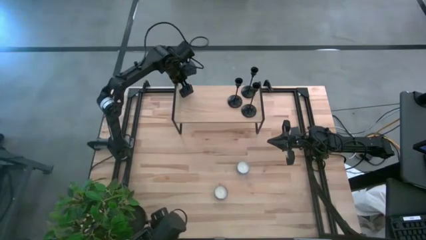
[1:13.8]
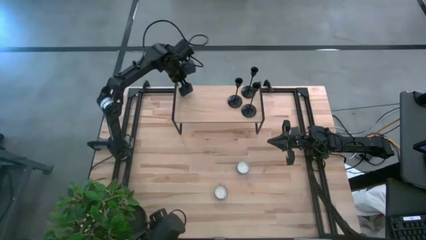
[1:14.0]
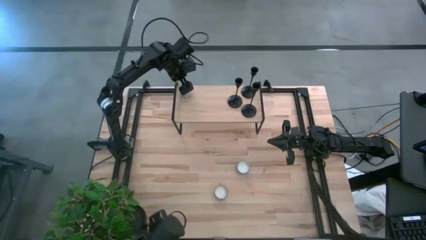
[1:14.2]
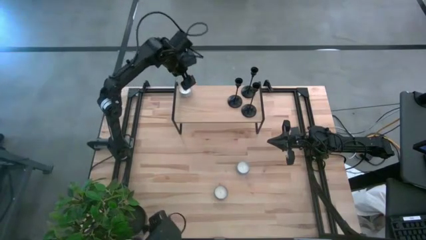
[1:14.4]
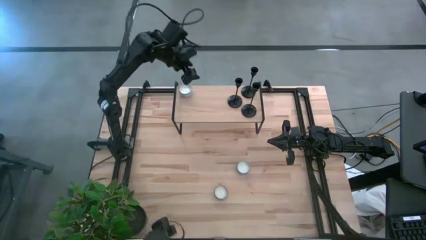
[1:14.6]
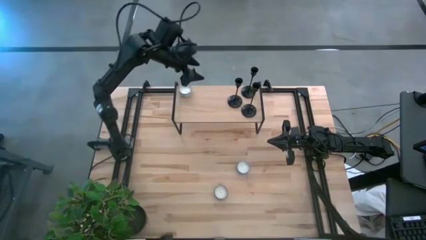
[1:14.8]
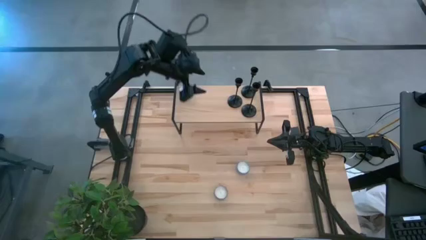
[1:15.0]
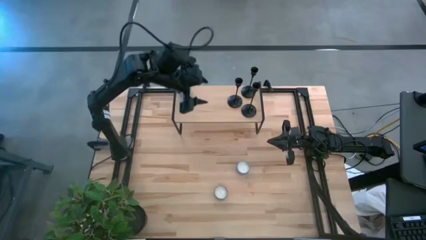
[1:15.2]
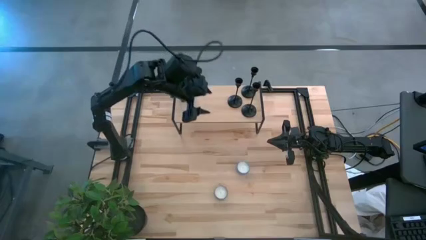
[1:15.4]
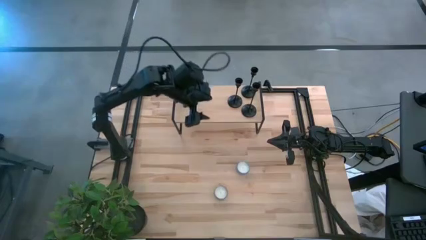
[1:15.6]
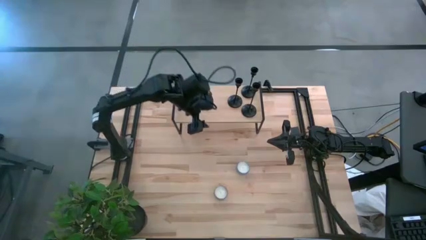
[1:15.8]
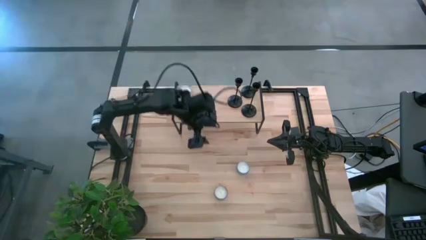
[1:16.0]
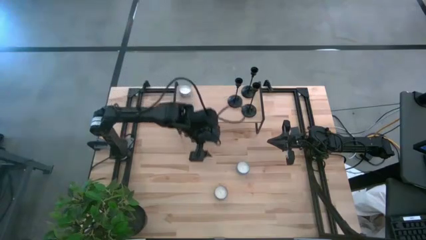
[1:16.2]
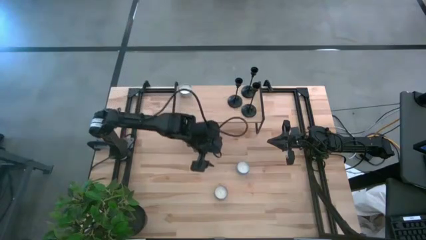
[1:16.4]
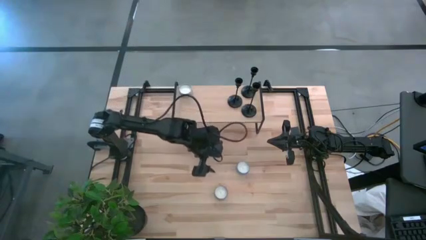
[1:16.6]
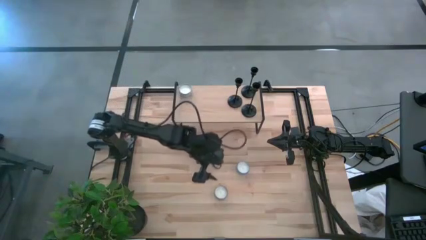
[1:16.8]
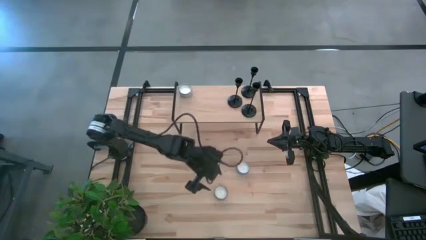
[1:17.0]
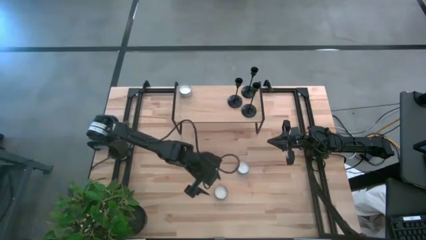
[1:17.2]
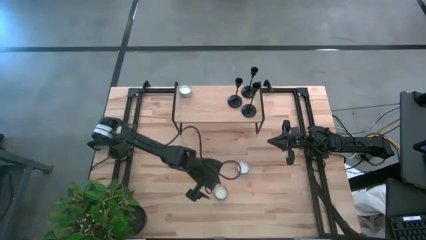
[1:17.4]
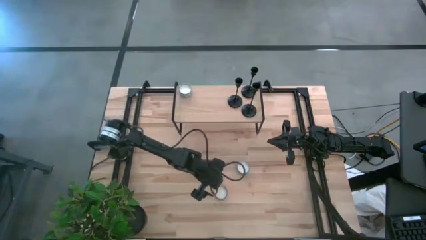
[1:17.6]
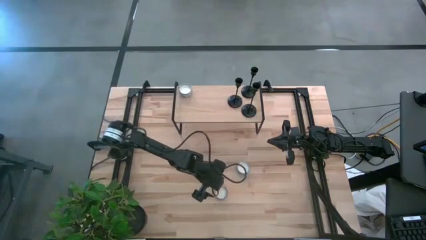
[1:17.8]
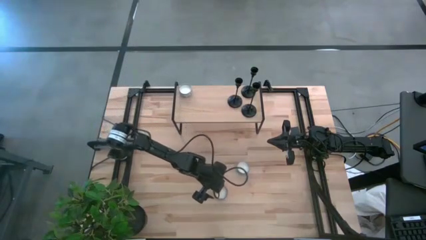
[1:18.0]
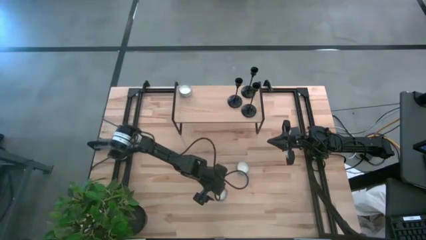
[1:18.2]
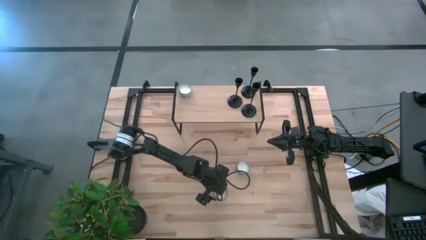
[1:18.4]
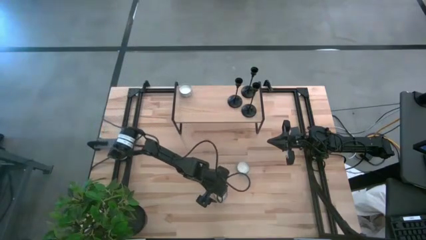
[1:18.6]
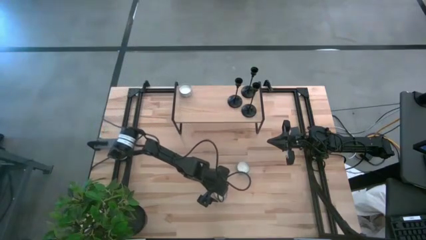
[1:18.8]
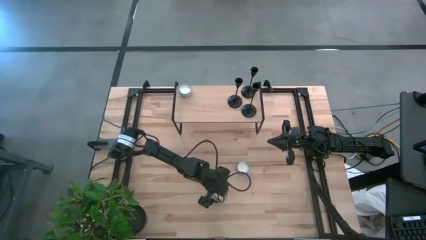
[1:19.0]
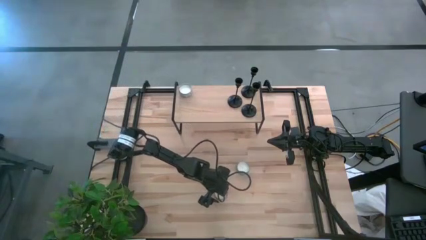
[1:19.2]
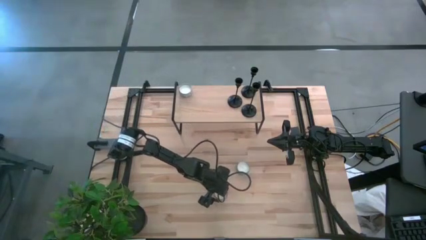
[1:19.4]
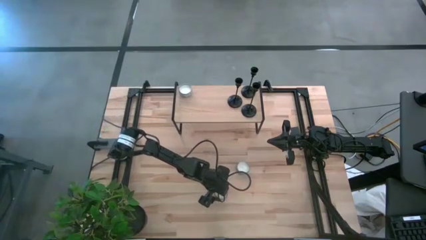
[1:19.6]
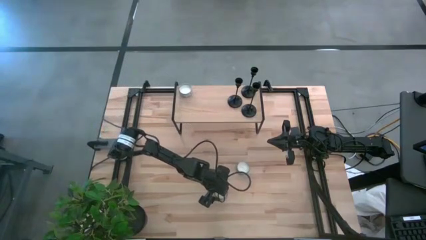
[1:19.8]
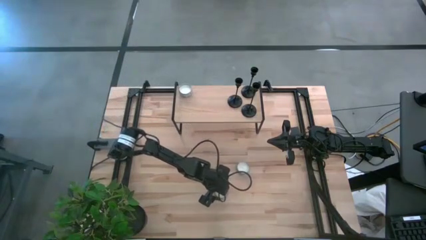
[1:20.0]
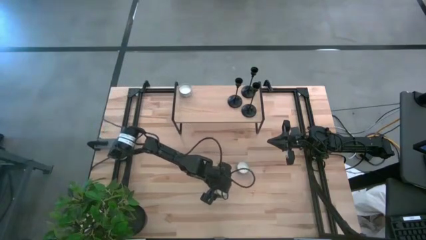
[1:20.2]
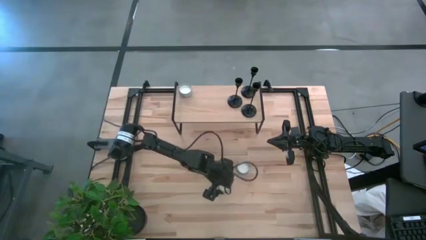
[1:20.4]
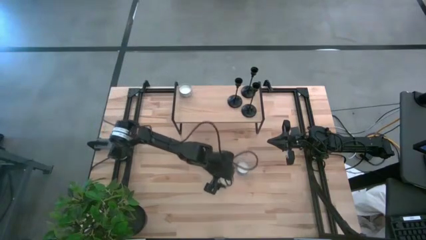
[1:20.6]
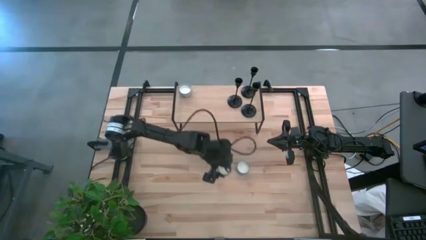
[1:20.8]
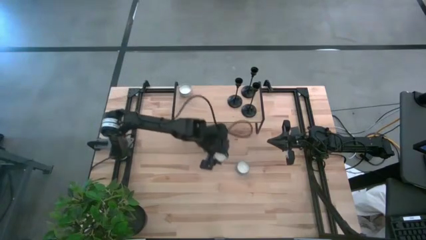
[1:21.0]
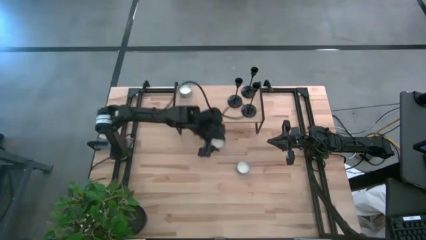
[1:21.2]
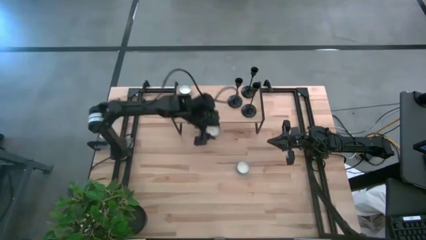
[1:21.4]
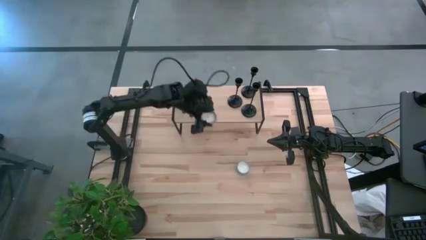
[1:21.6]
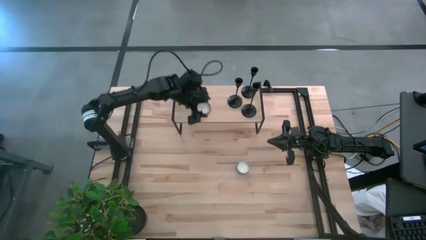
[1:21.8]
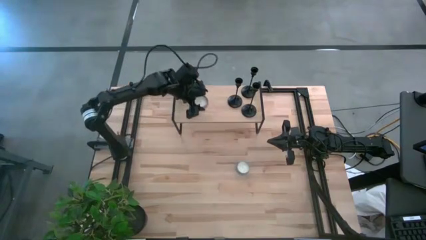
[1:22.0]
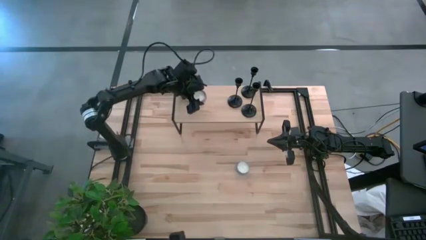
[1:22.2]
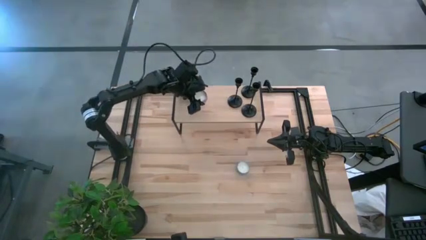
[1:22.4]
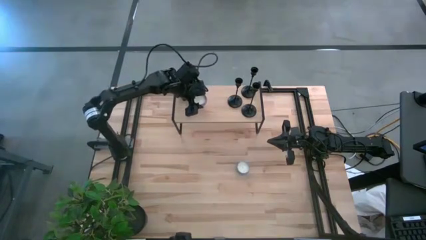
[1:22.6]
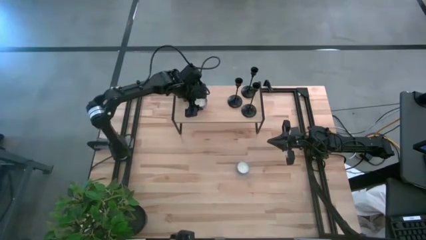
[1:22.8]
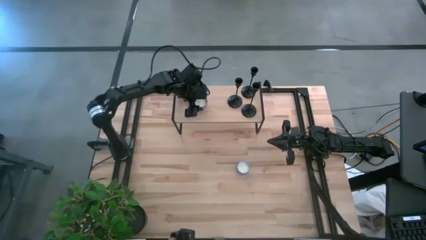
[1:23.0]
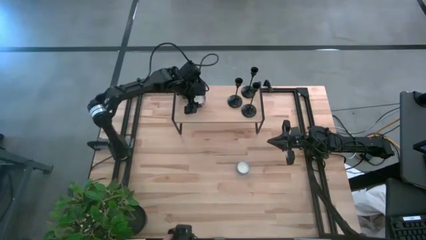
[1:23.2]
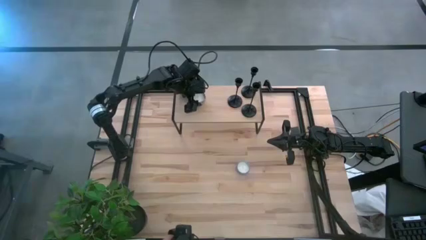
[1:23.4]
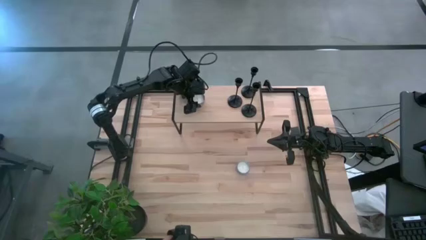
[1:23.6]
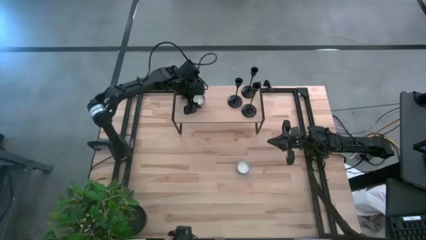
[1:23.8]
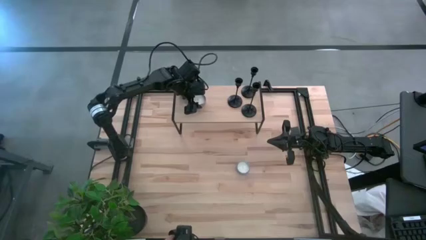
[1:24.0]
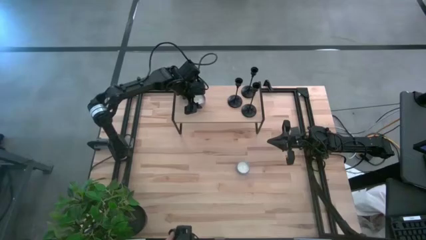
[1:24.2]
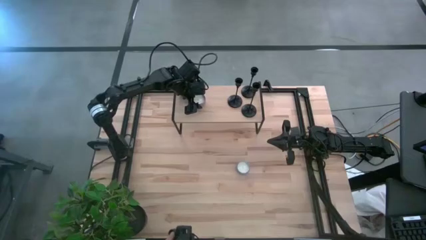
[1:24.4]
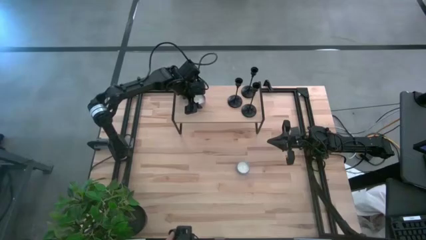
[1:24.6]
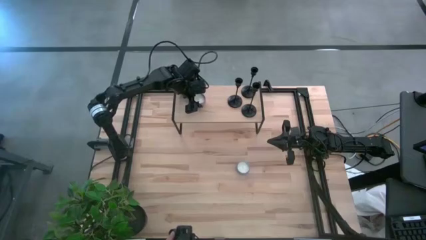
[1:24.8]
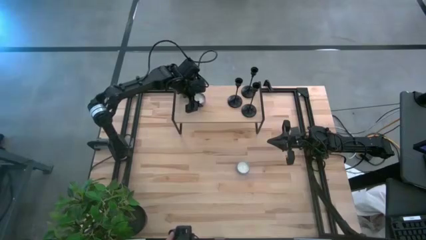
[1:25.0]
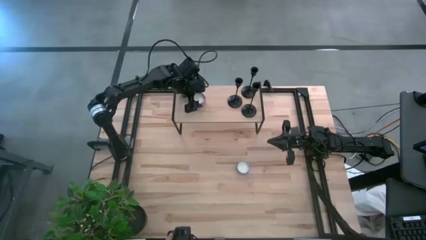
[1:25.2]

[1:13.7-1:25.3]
Task: Pick & Place candle stick holders
Put the pink scented candle on the shelf

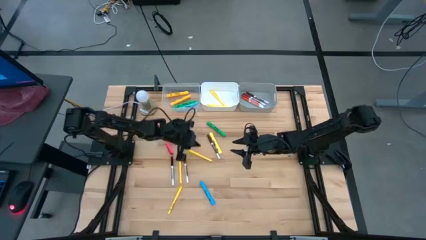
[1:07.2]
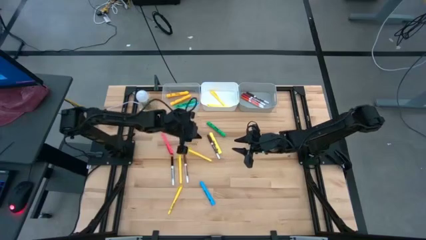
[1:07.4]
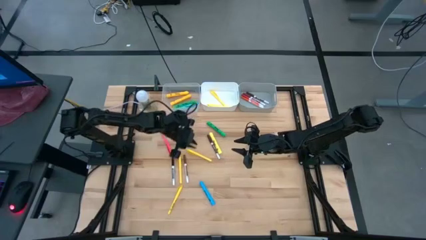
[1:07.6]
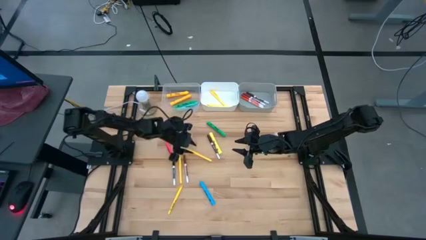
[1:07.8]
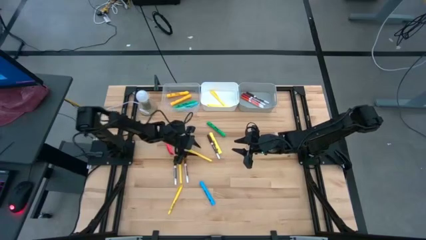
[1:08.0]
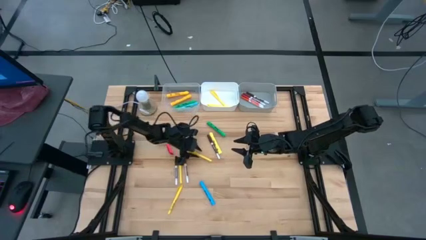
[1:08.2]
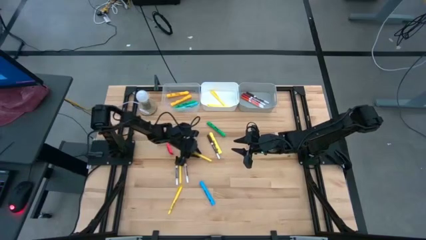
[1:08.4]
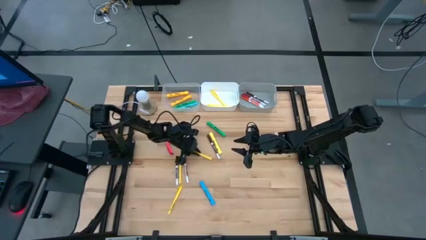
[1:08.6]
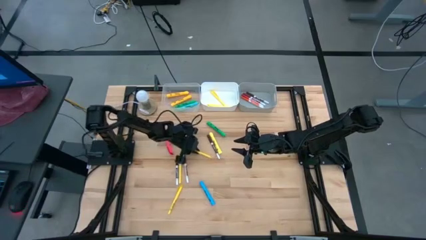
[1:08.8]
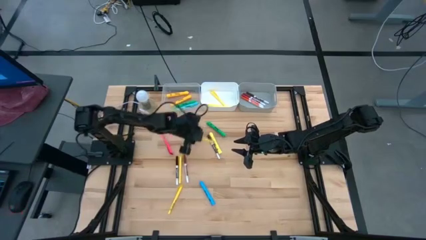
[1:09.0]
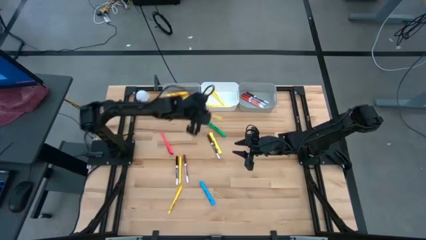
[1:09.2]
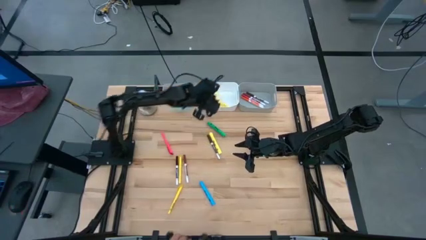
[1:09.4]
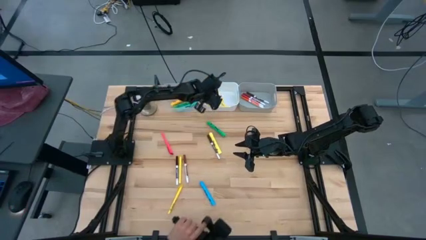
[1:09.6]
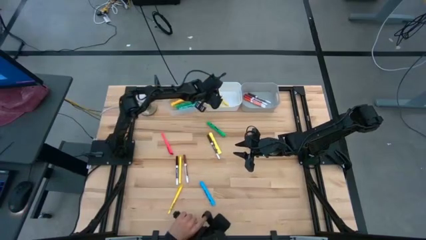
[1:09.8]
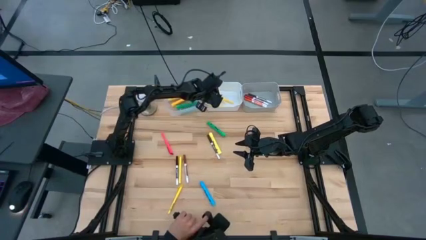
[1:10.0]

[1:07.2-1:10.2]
Task: Pick & Place Markers
Put the yellow pen into the white bin
